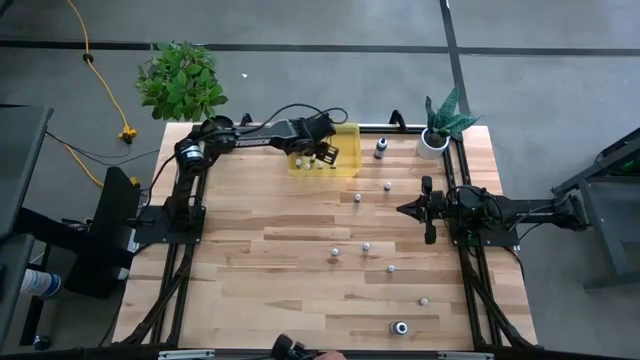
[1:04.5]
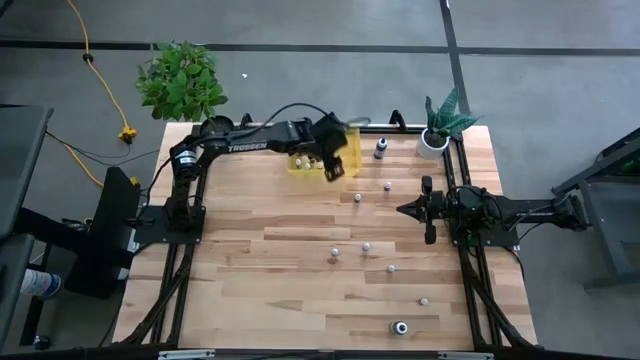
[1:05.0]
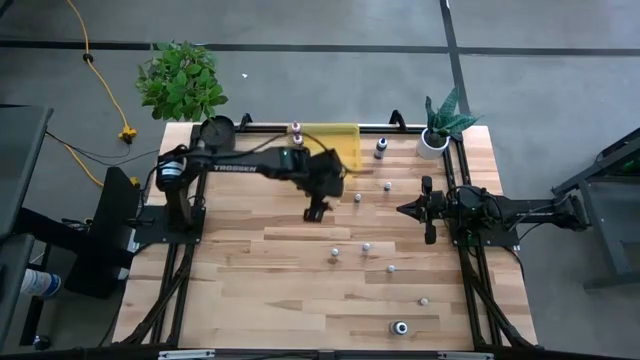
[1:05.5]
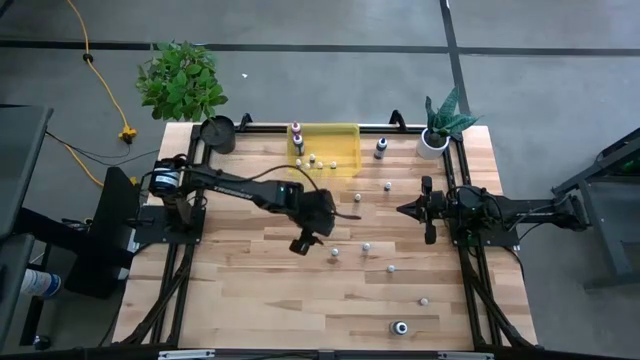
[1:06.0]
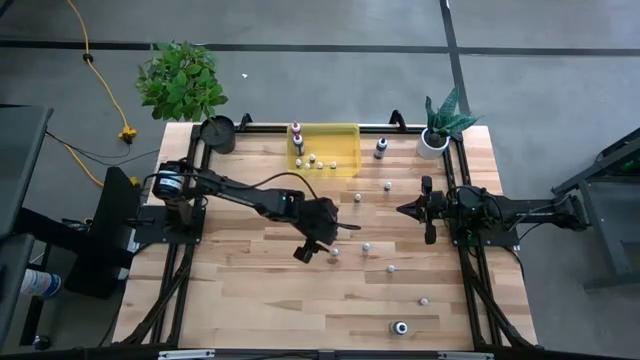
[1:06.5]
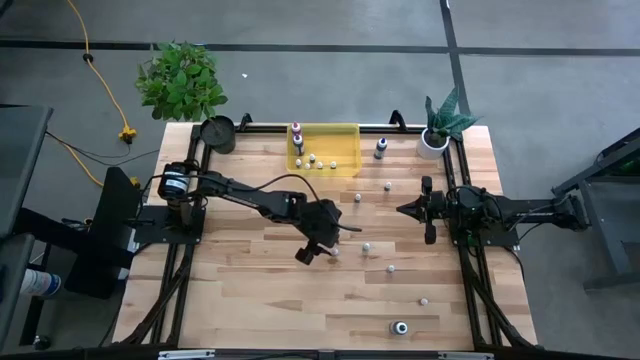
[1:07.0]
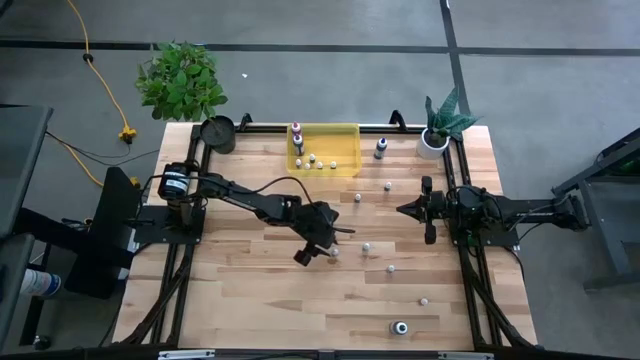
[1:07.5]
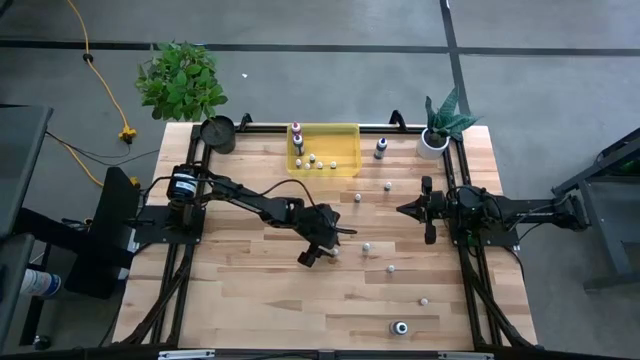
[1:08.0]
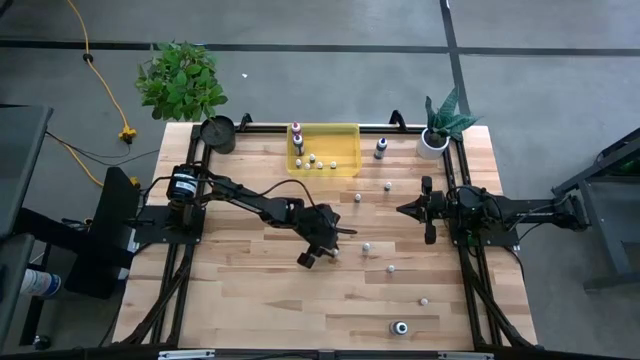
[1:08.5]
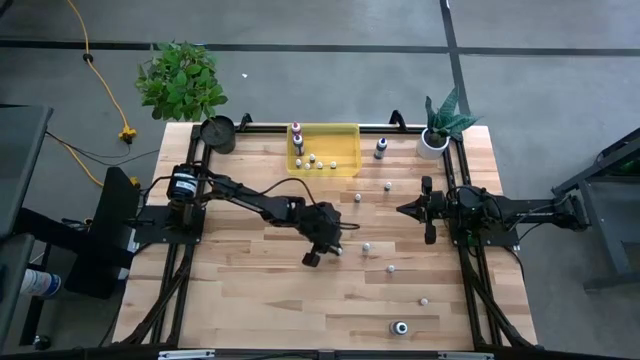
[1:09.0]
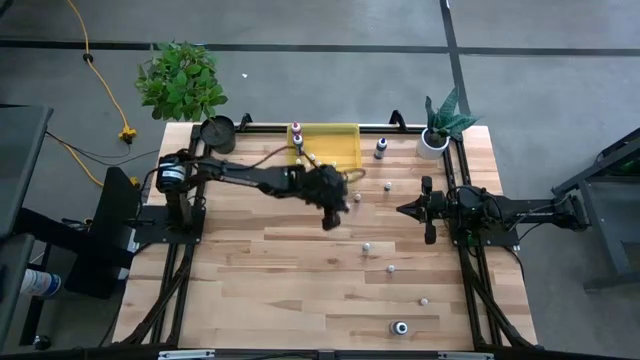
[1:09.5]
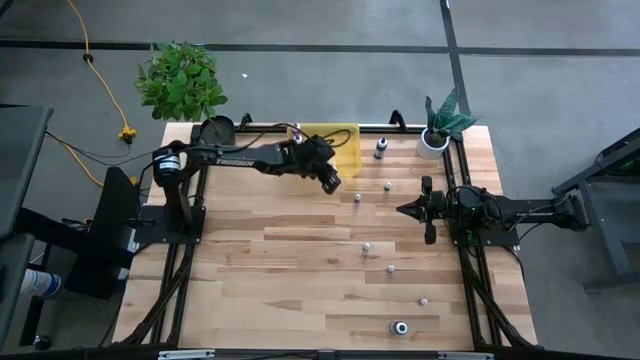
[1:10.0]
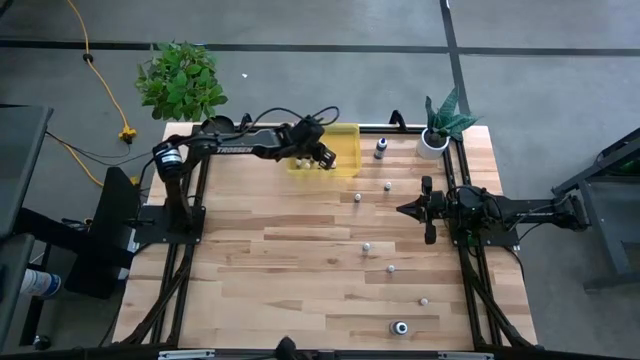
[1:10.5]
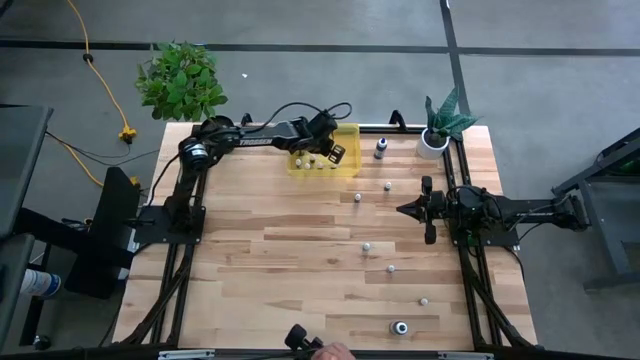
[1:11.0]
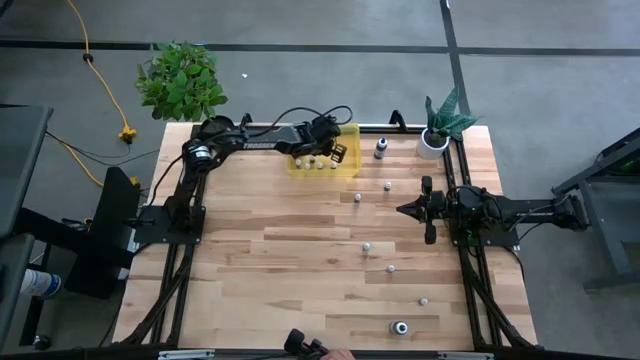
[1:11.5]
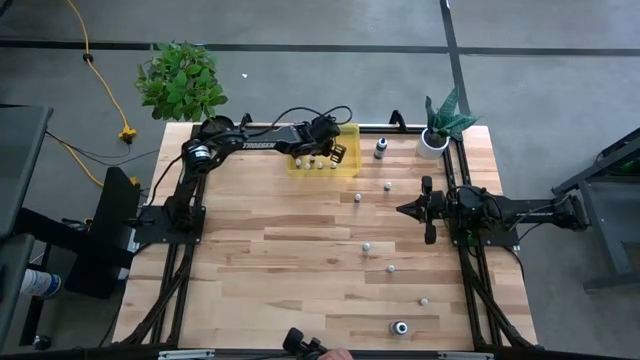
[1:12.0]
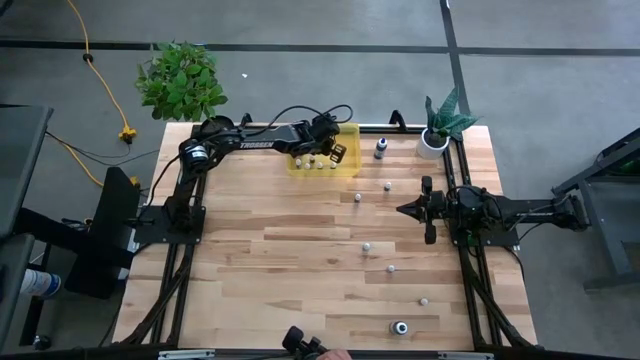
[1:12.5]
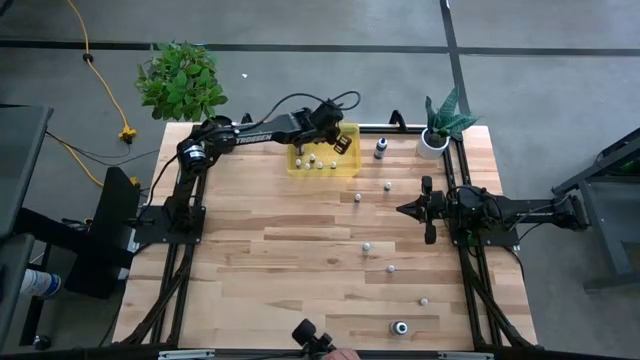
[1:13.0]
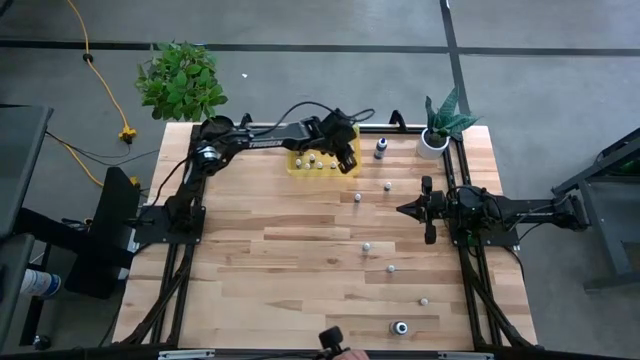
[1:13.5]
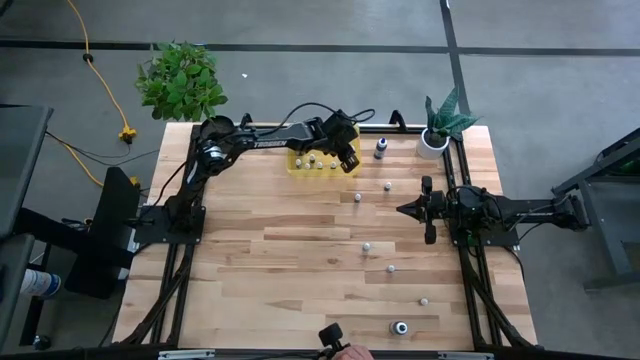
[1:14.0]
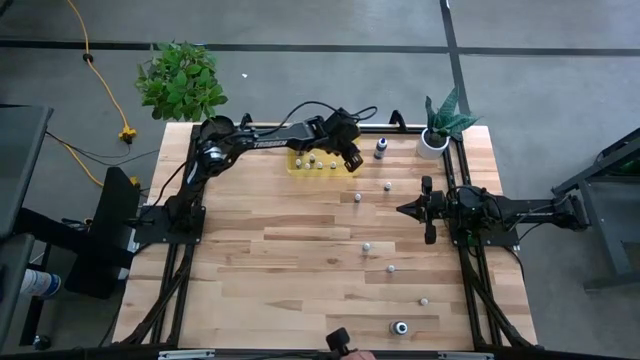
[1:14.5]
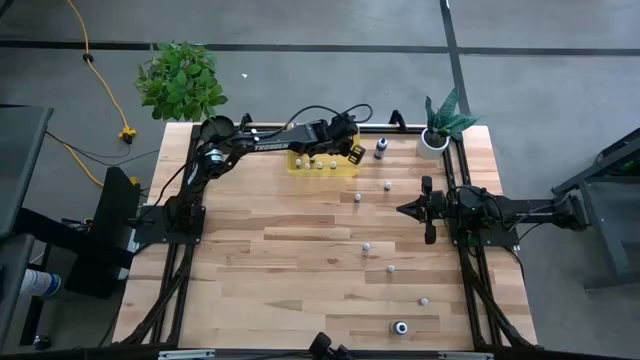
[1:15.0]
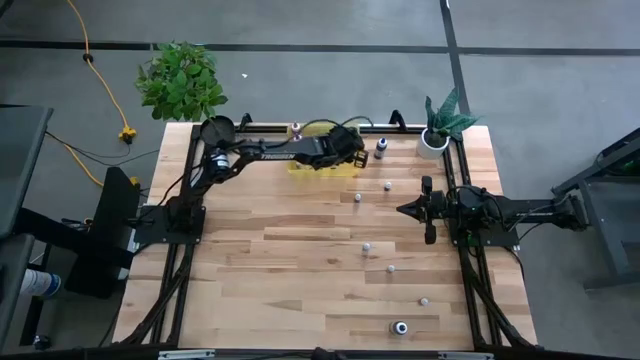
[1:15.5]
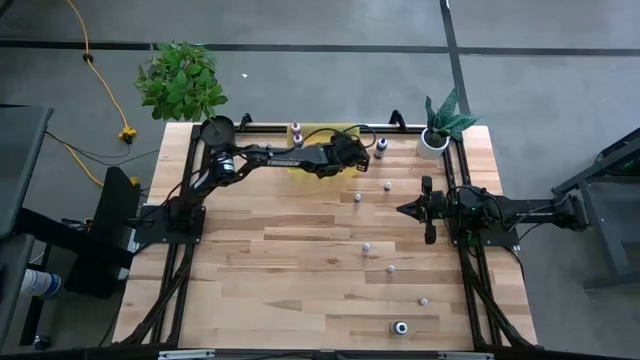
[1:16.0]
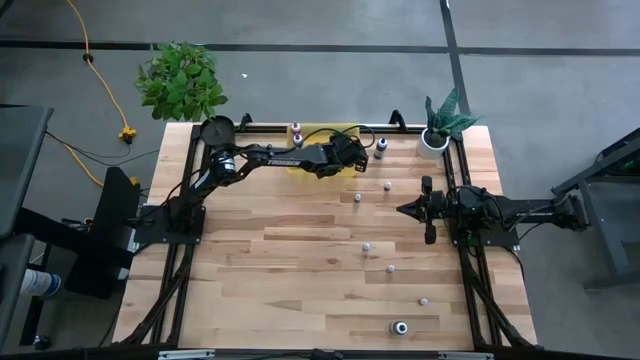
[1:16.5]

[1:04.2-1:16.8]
Task: Pick & Place food coloring
Put the small violet food coloring bottle into the yellow container

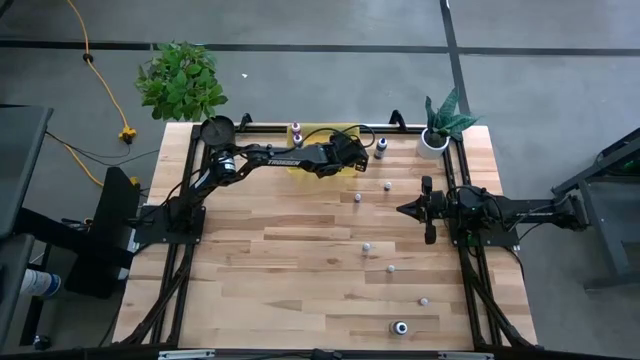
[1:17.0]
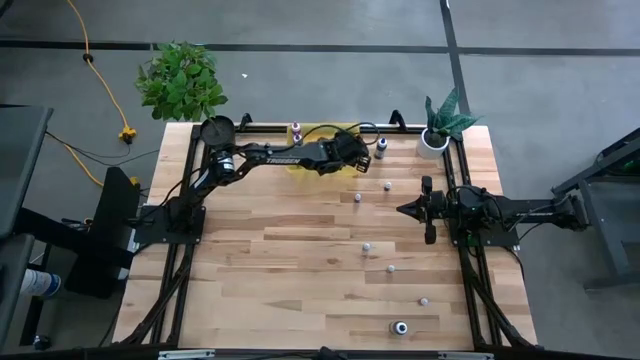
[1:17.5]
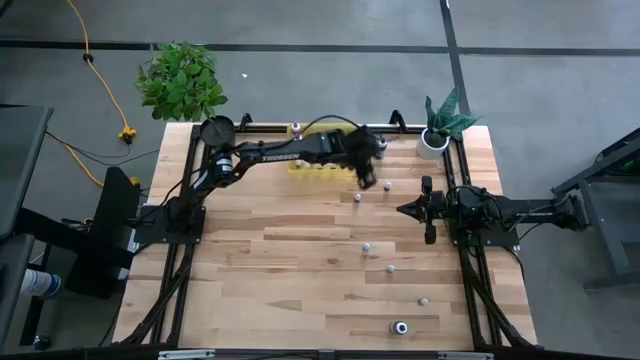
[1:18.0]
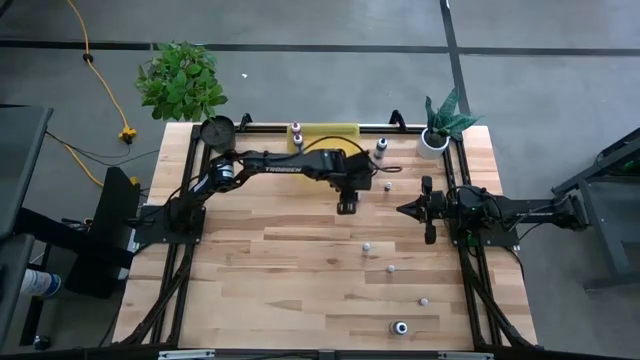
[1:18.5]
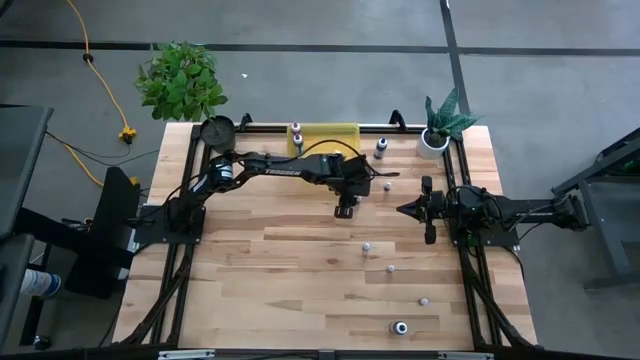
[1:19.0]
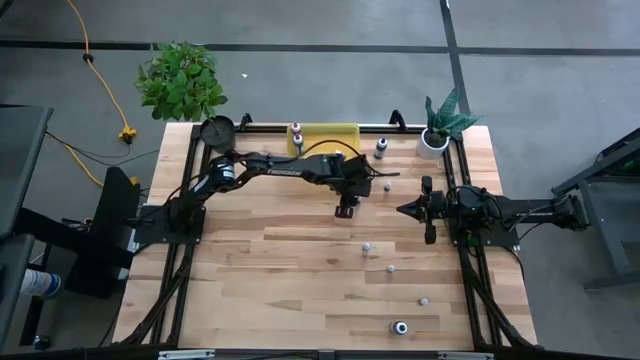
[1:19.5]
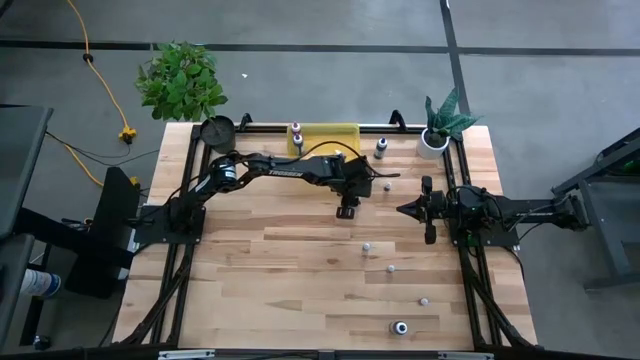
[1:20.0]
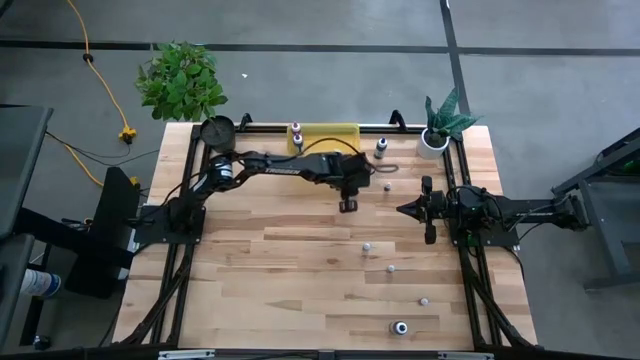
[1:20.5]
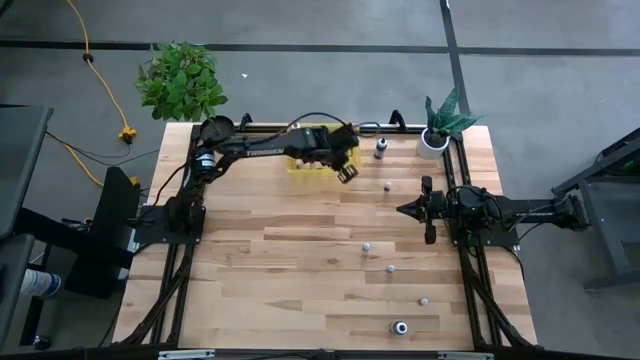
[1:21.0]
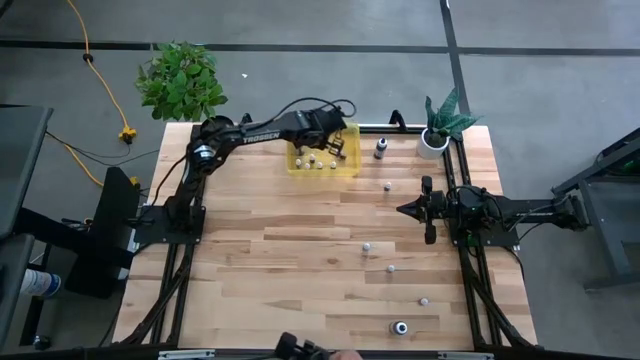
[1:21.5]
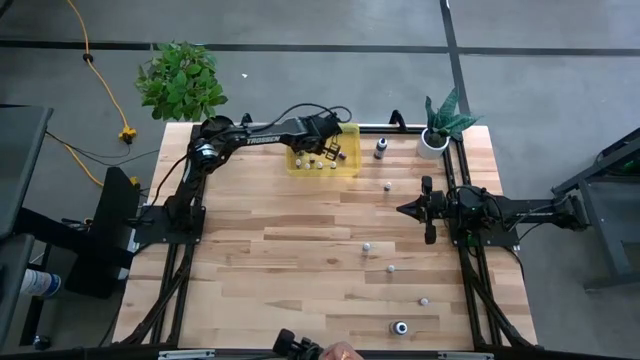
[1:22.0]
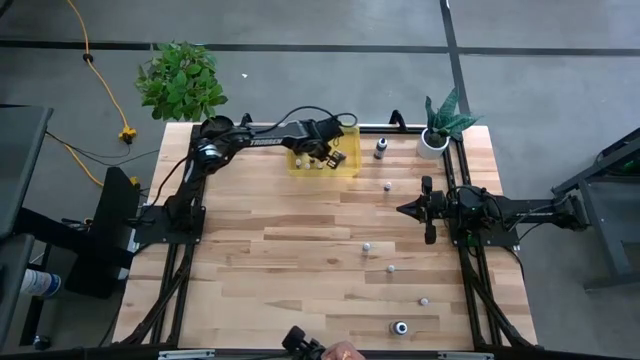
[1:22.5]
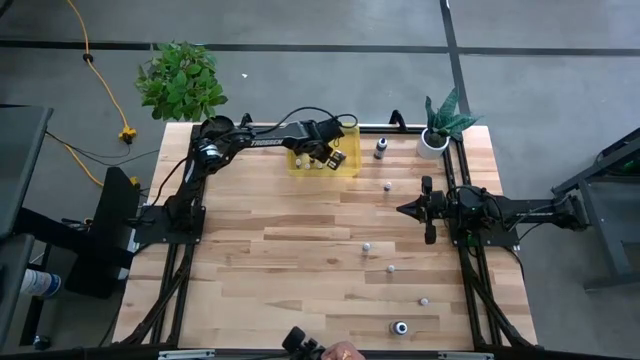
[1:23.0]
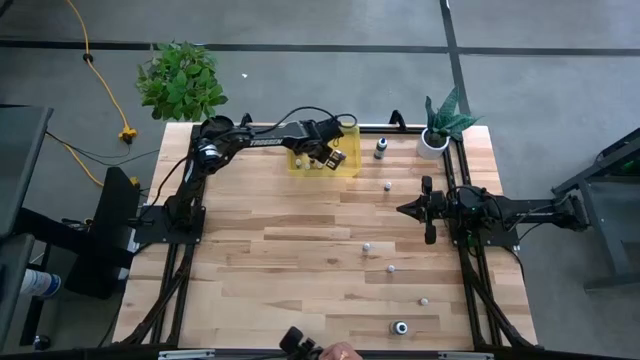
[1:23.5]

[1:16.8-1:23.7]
Put the small brown food coloring bottle into the yellow container

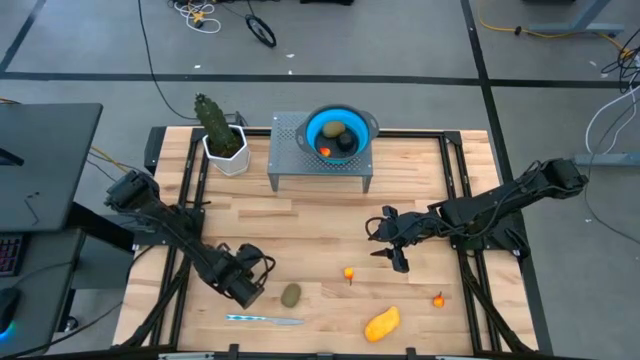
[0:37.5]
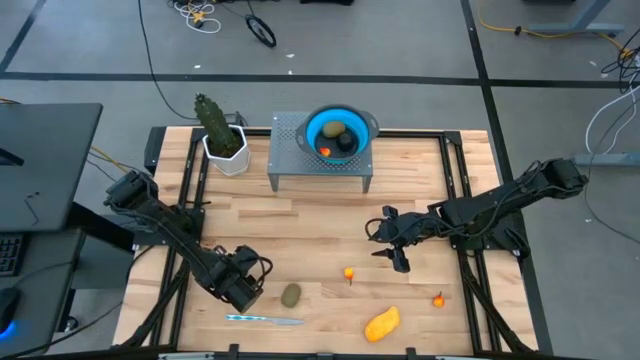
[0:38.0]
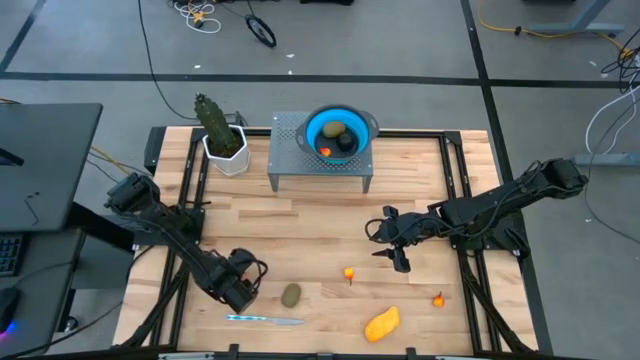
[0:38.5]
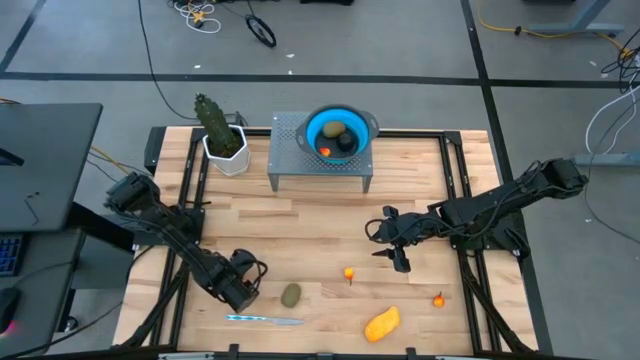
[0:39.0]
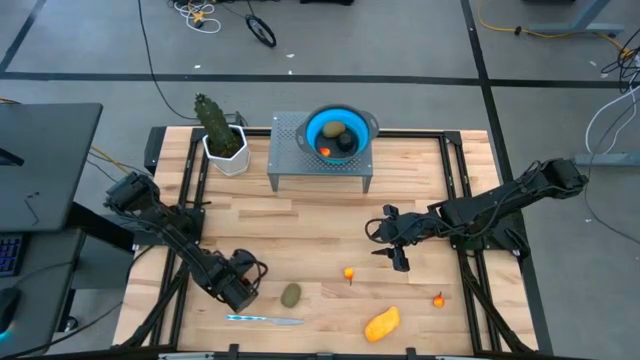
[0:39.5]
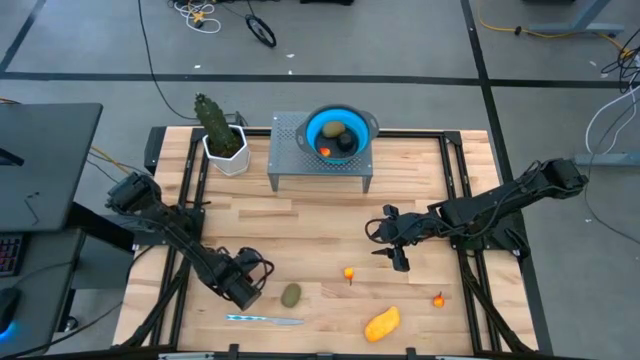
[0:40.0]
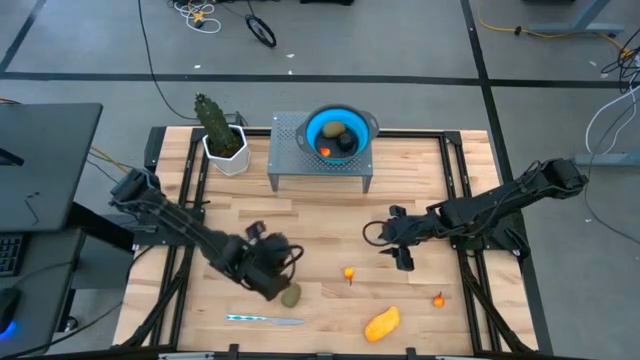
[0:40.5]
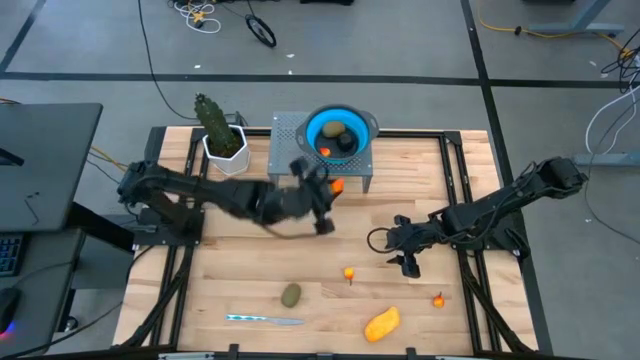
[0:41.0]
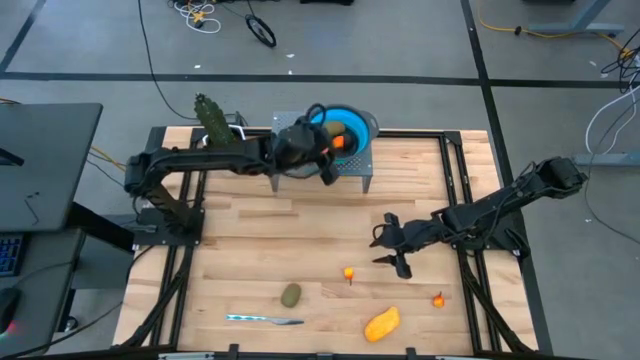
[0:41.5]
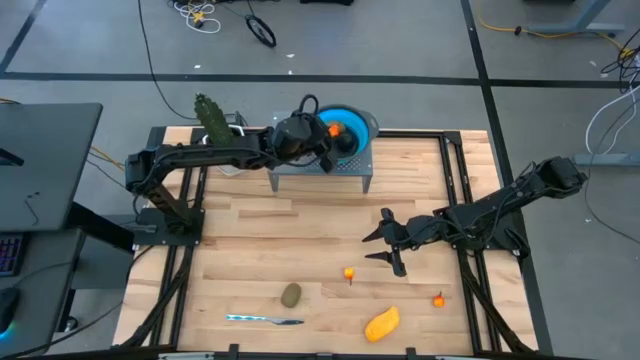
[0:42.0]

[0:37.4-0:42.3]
Task: Pick & Place Fruit
Put the orange peach in the blue strainer bowl on the shelf
